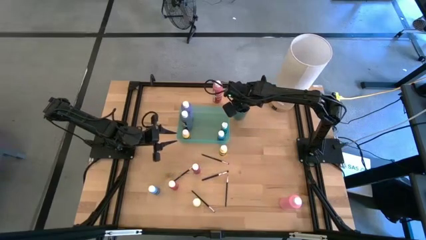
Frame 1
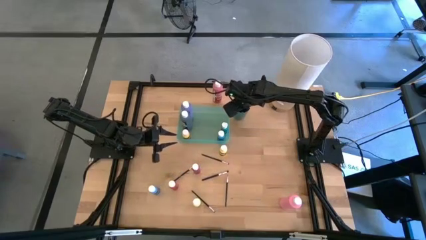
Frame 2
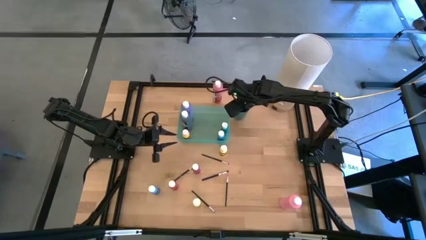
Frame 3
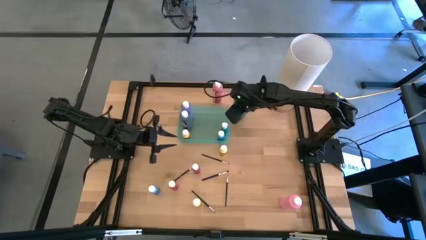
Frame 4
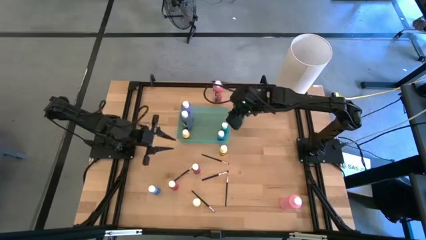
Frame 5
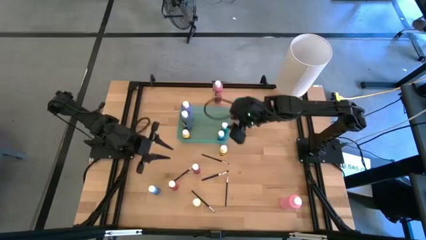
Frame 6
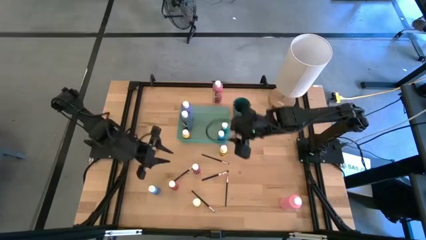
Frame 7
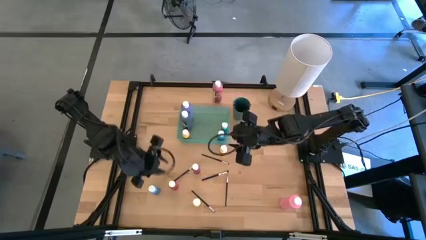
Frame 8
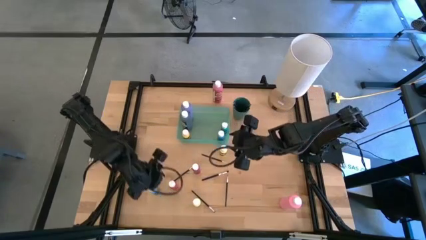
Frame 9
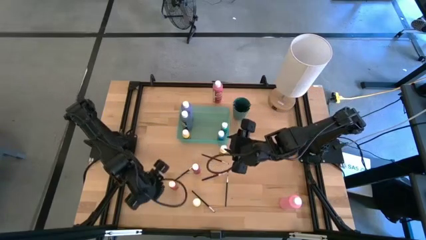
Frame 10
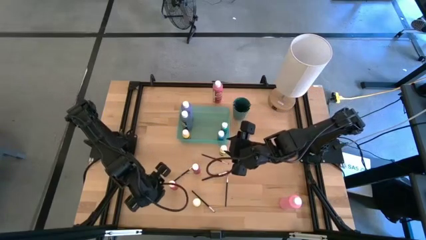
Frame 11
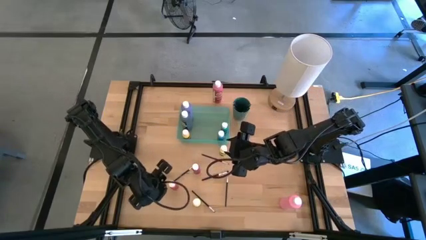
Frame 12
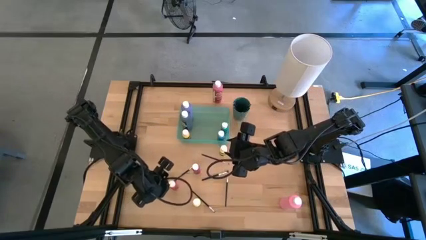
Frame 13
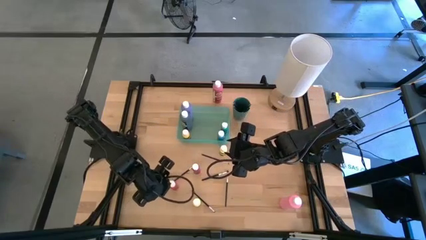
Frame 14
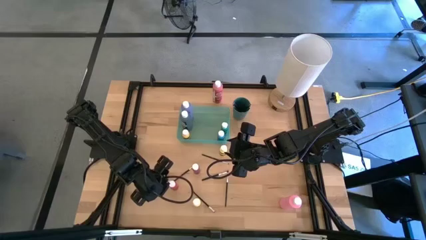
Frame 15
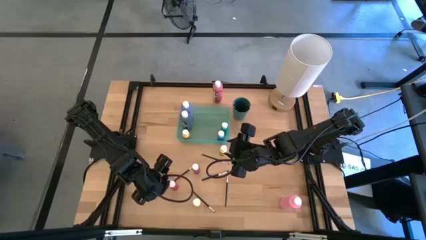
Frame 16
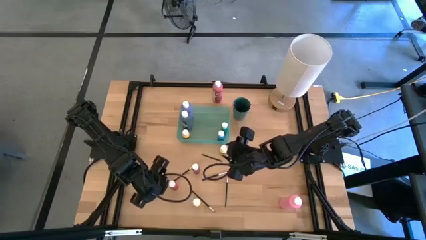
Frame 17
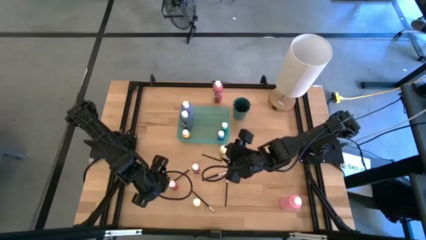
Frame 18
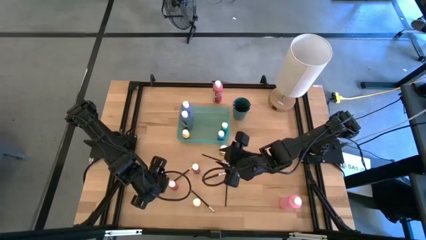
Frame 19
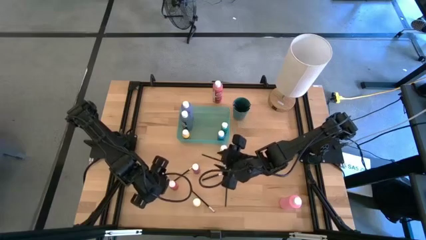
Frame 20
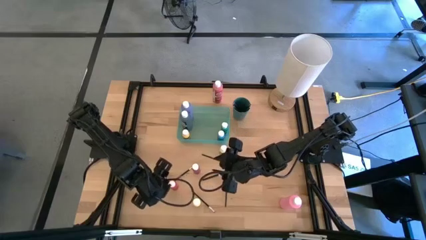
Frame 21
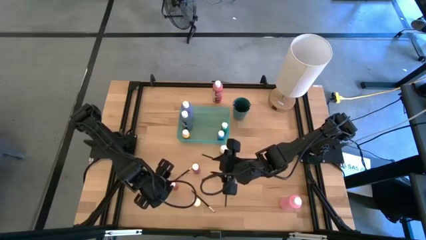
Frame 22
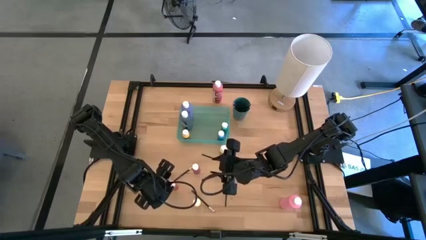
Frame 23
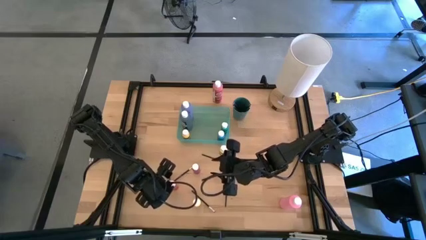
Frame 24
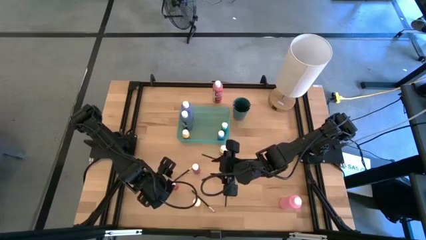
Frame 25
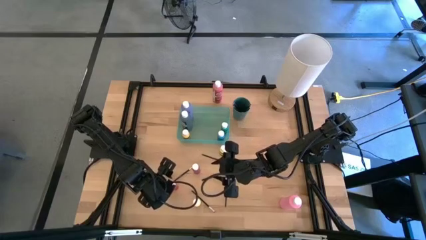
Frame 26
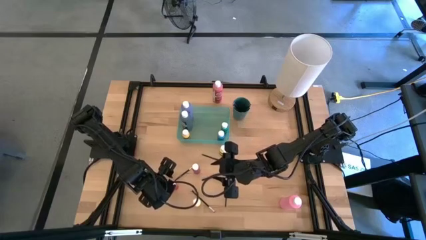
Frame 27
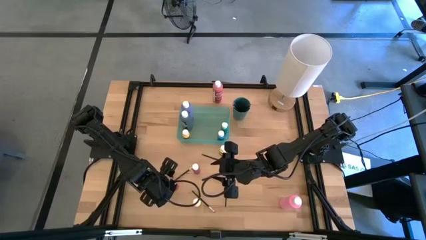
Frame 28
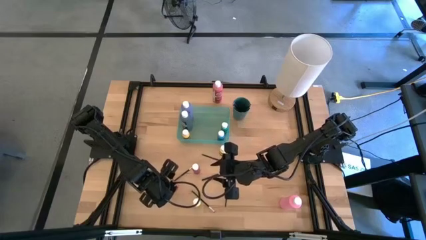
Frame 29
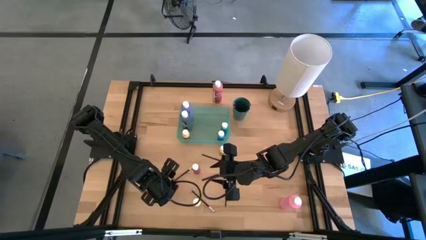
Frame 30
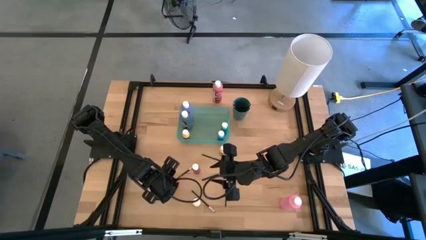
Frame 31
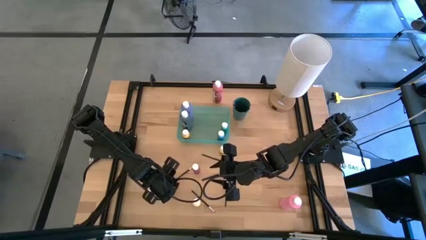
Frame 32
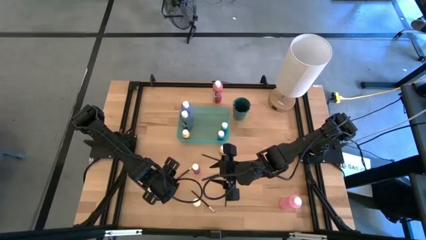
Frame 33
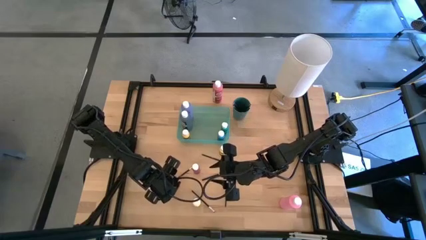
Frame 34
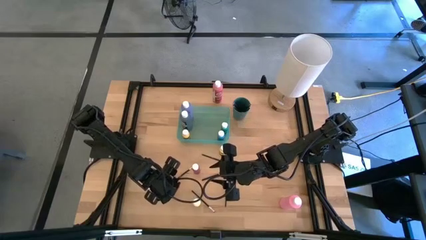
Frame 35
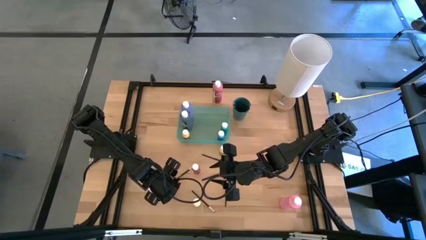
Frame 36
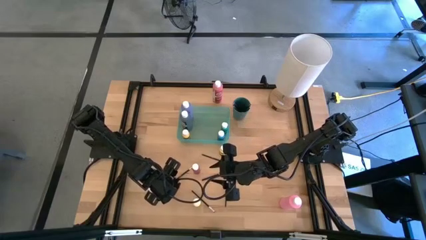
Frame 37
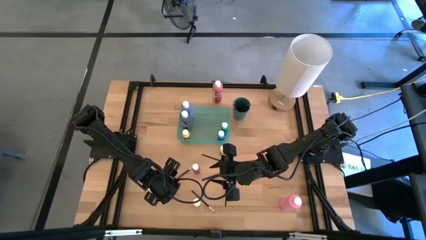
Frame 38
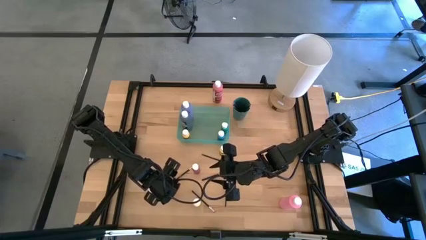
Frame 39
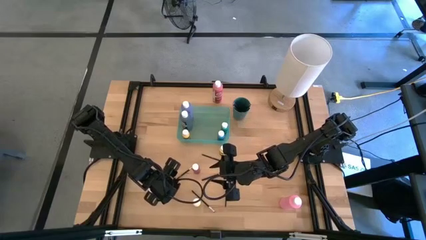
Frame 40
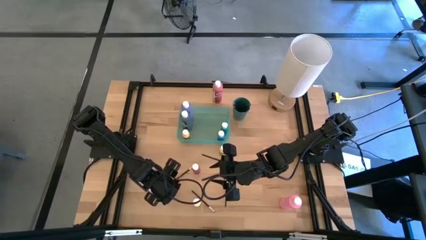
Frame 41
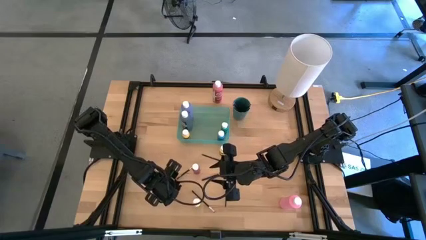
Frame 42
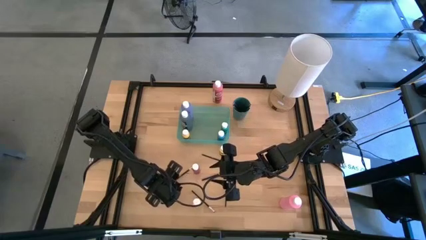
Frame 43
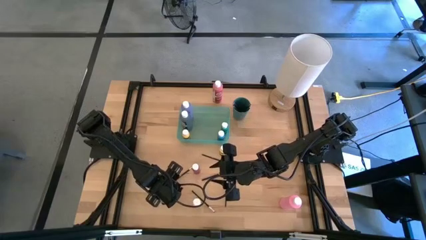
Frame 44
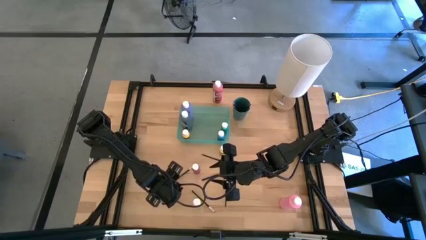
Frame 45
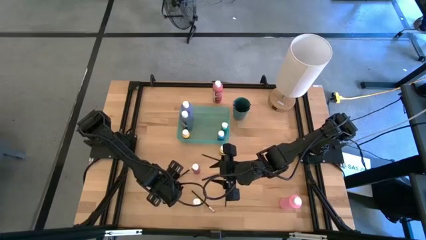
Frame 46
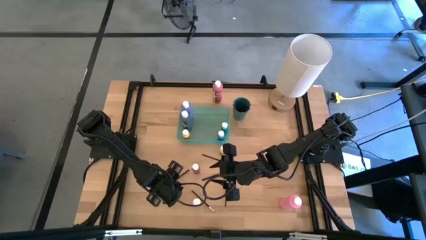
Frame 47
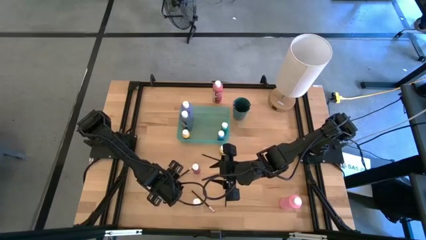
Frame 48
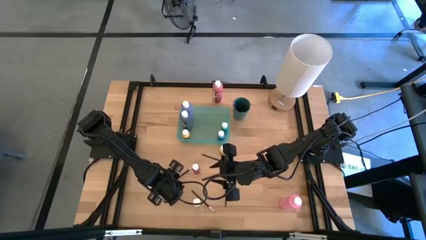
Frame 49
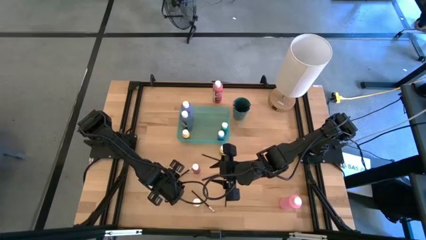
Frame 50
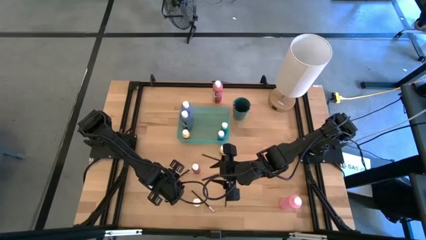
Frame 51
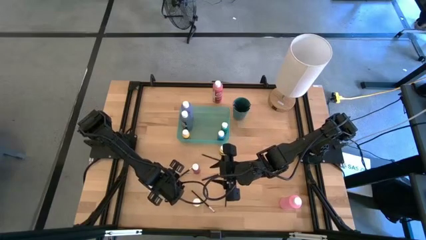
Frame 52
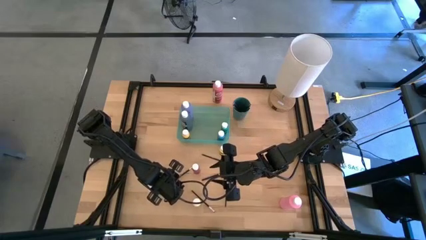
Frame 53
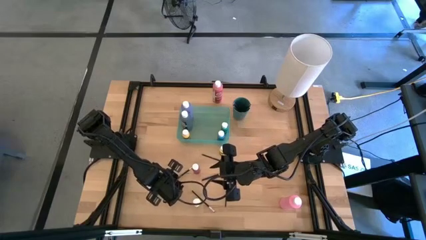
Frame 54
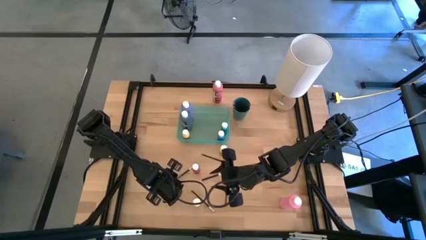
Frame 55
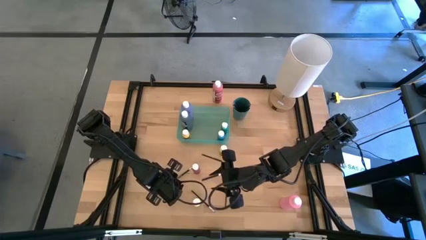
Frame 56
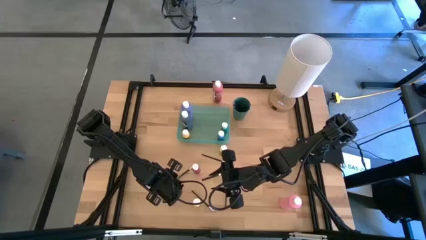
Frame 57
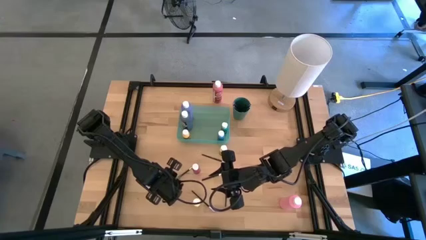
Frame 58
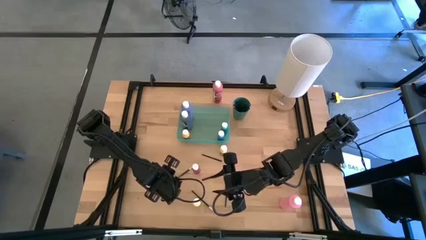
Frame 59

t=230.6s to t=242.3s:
Task: Pick & Place Paint Supplies
Put the small red paint bottle into the green bin
